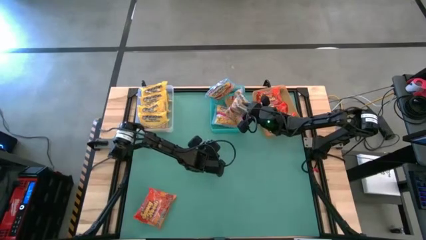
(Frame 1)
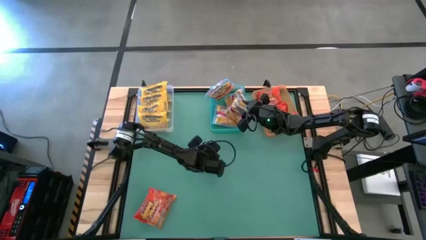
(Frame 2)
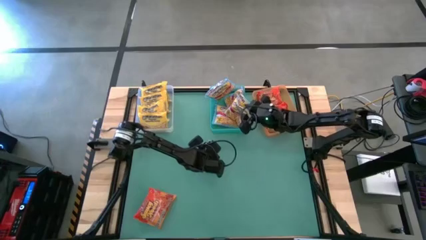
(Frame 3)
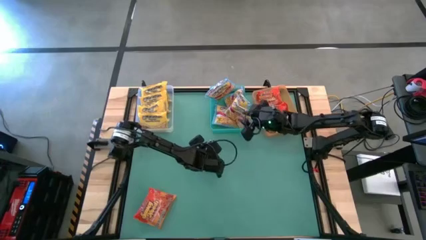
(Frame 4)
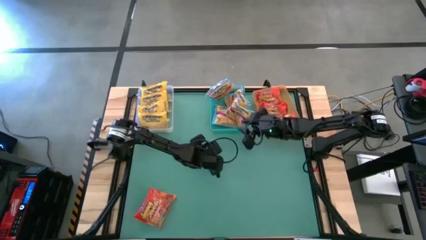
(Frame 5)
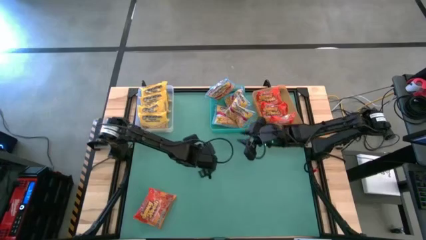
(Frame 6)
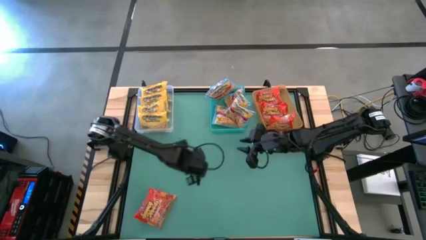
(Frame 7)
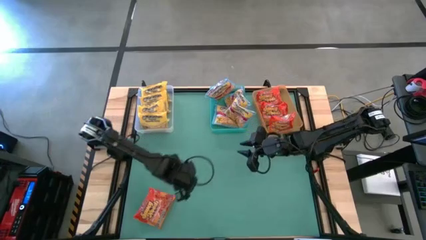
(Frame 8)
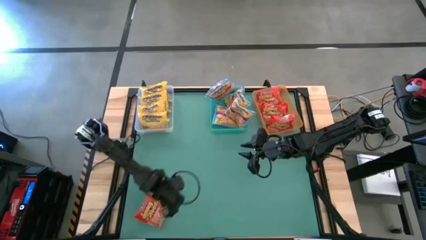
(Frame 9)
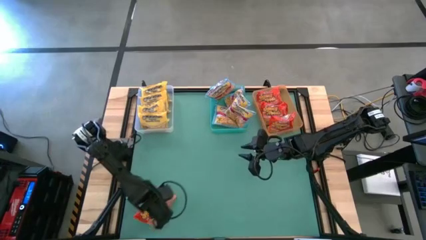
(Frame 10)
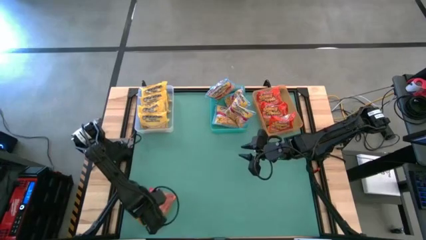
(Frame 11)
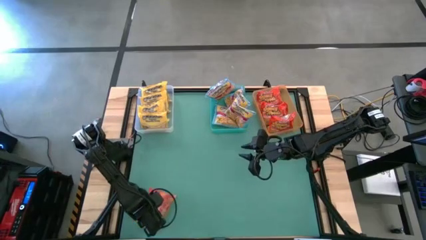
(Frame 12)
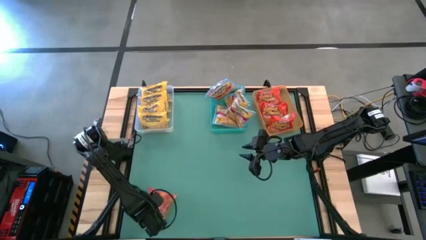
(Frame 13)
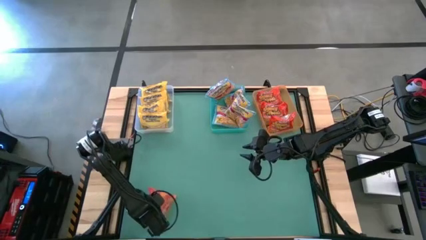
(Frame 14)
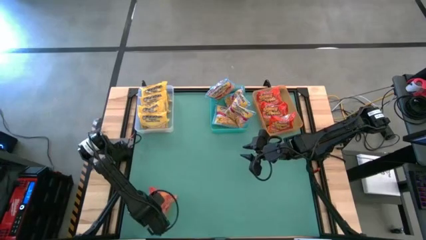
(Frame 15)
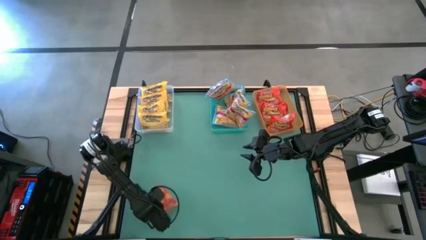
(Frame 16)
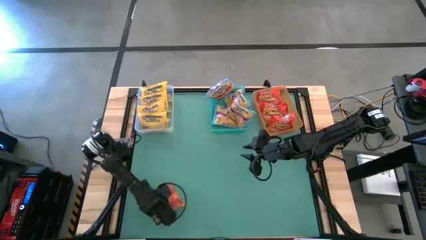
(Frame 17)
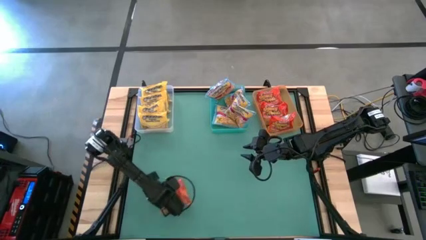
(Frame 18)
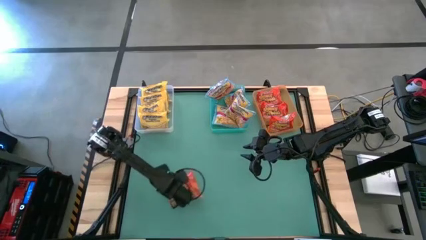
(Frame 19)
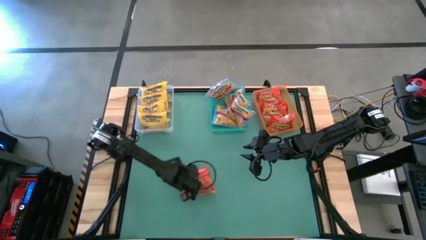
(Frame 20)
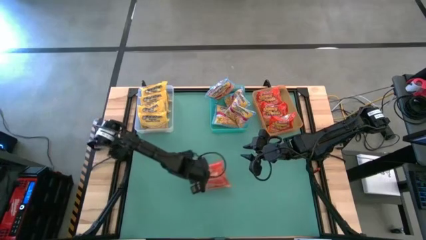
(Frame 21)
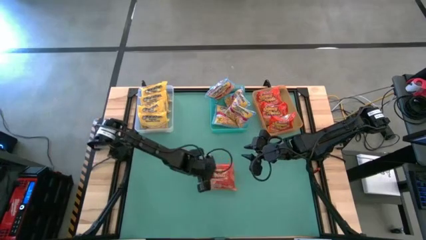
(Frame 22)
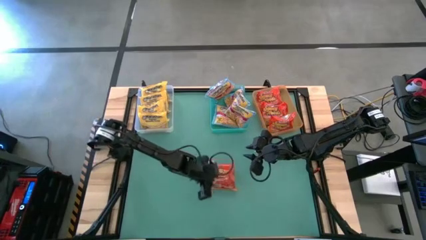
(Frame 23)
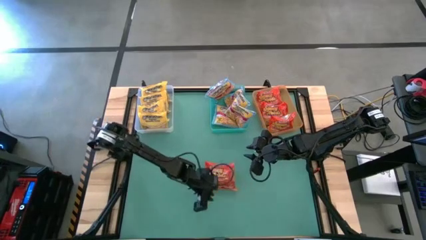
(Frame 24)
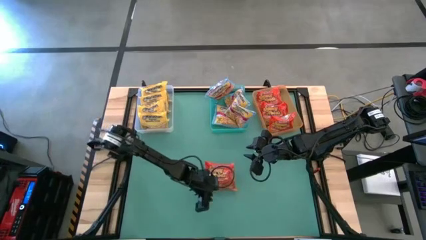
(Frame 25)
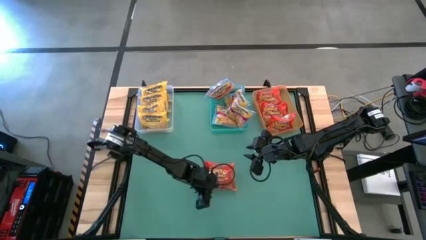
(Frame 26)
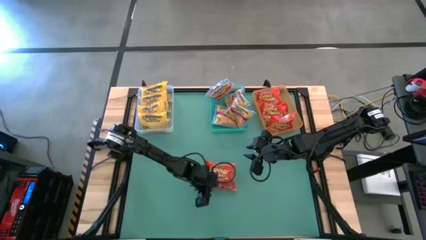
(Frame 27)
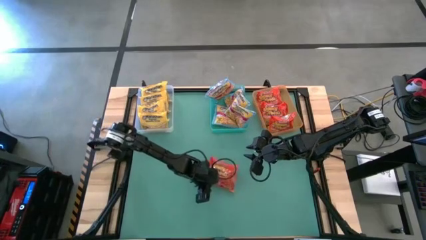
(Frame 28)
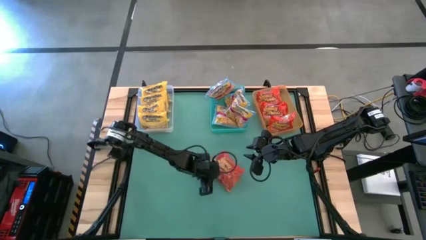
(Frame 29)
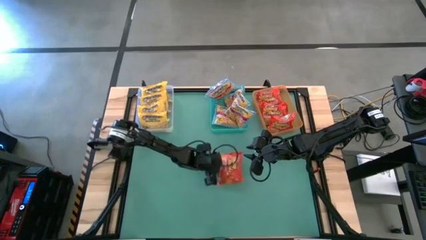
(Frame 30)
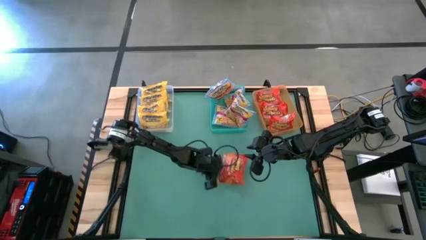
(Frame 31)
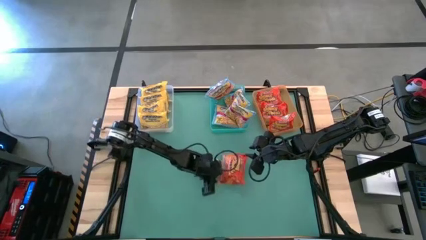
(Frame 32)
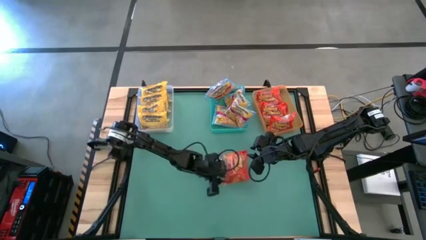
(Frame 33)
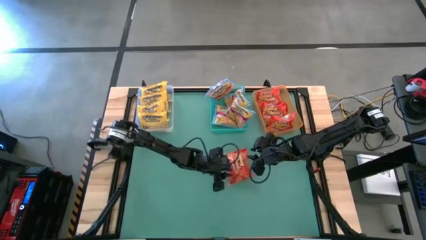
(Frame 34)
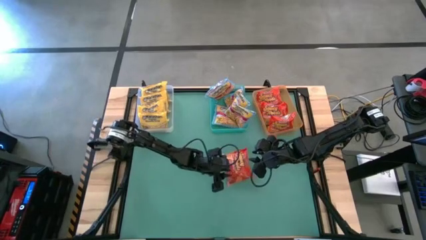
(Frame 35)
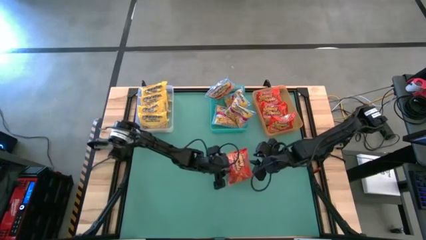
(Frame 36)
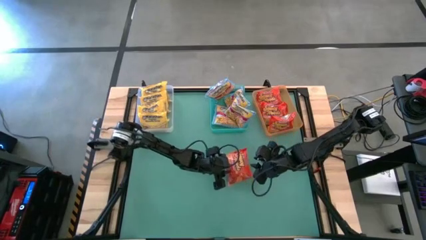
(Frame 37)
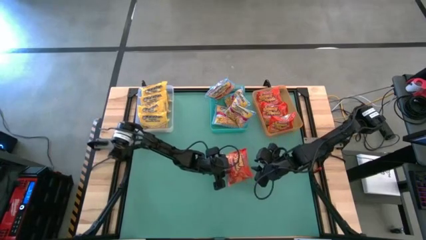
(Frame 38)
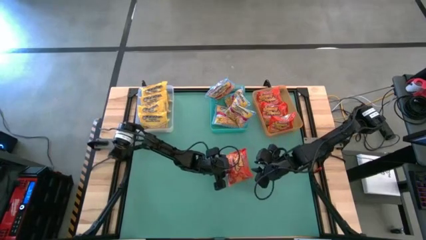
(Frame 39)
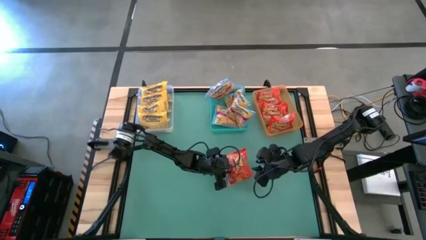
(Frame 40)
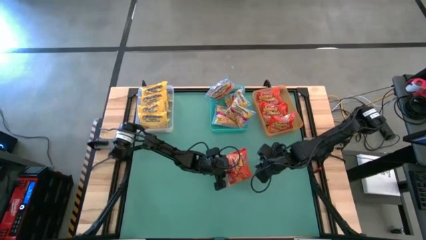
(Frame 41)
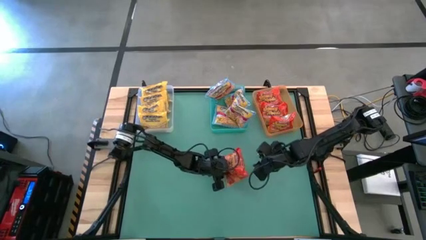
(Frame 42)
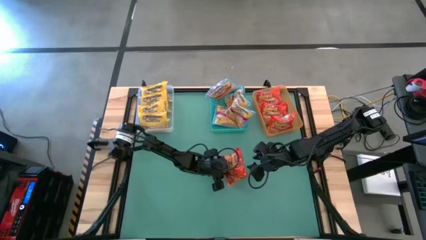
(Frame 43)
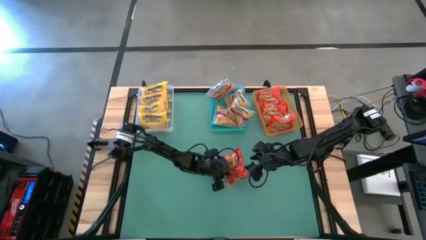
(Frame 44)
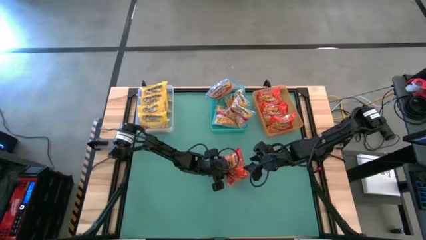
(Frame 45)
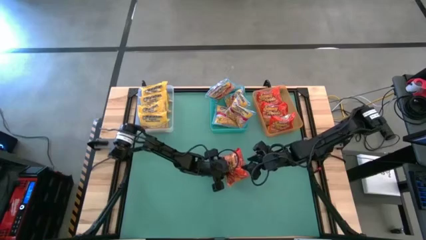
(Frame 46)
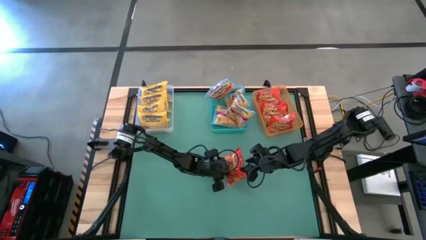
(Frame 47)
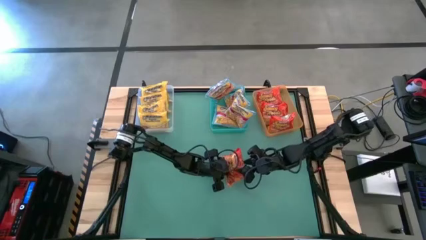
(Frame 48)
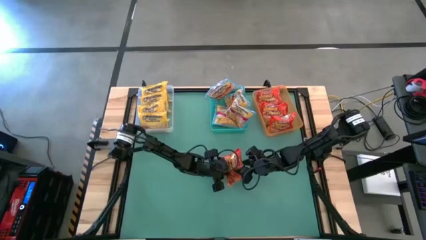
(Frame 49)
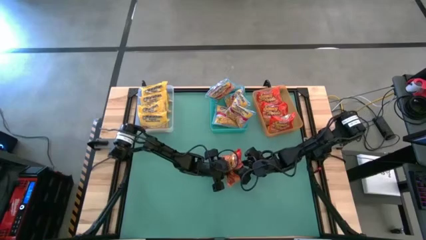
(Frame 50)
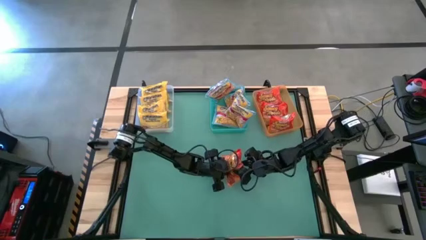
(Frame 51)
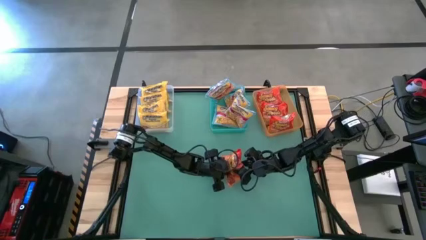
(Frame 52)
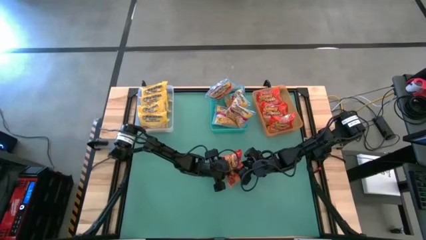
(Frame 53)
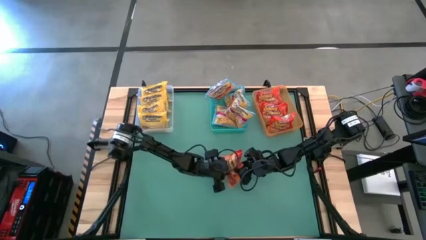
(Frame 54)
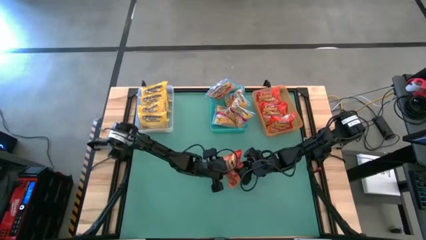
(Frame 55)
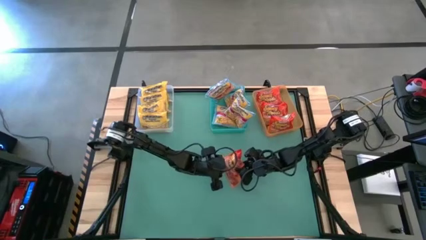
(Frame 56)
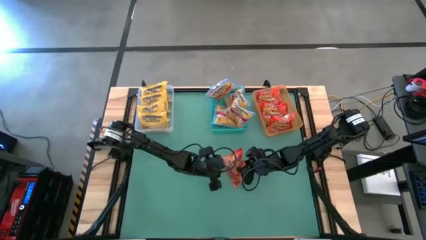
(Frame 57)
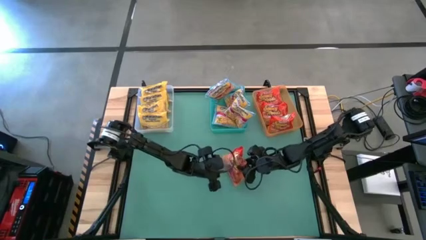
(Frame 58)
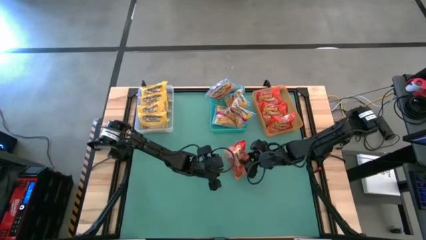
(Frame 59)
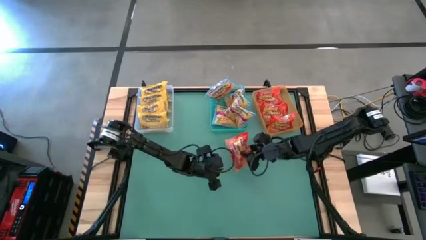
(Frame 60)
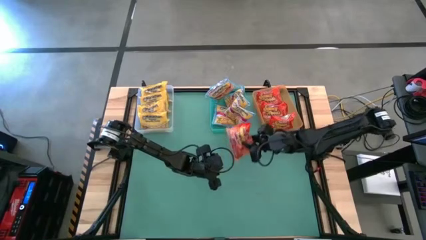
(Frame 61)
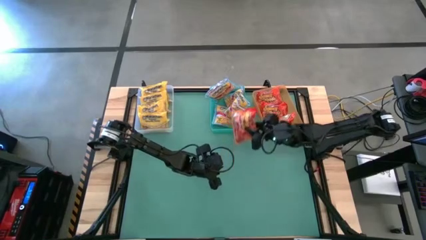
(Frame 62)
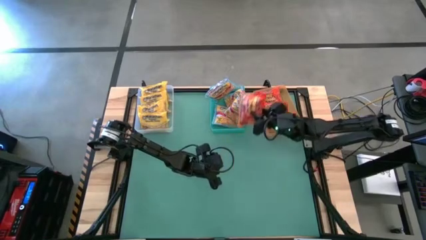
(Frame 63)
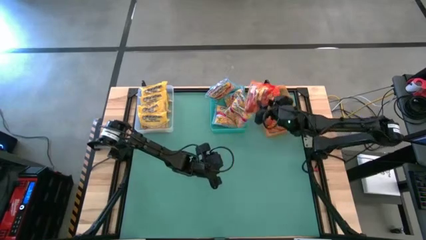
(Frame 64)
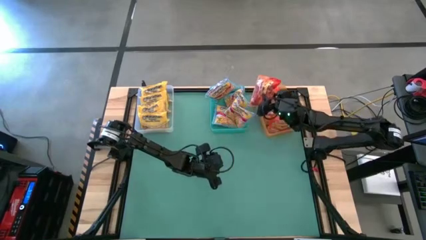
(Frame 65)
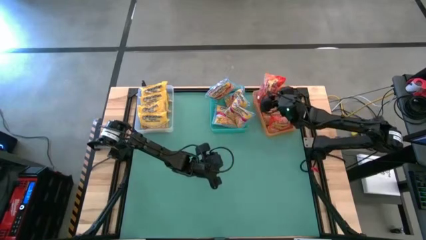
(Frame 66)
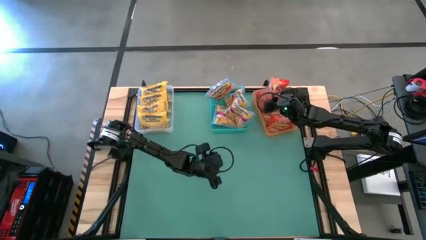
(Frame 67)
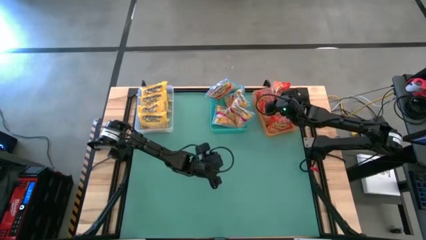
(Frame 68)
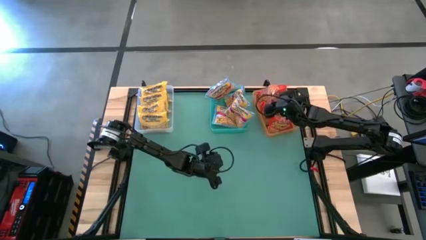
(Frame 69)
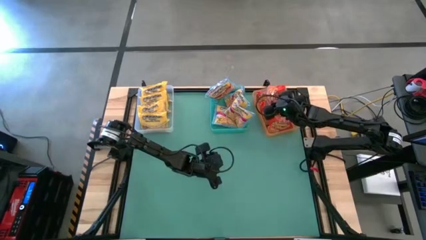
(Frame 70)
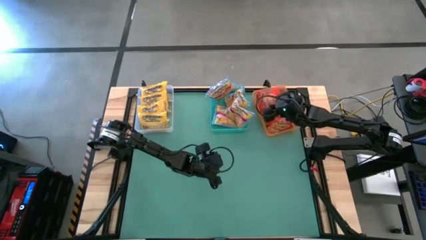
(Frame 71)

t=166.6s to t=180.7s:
Task: Sort Maruchan noodles
Put the orange noodle pack into the orange bin
